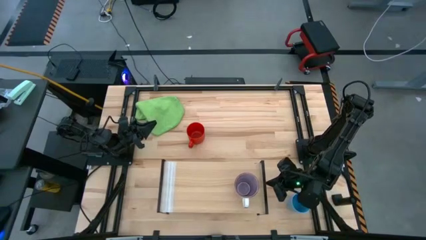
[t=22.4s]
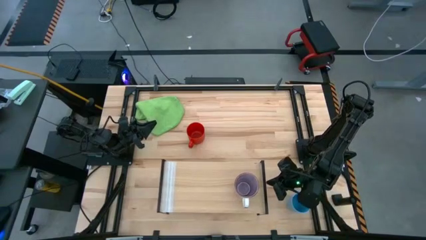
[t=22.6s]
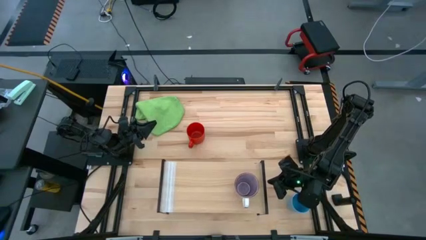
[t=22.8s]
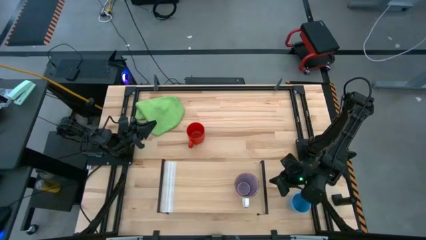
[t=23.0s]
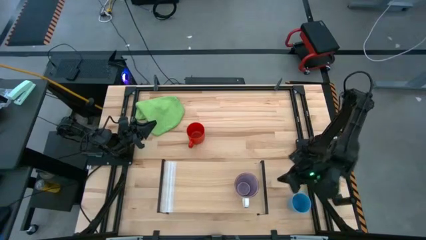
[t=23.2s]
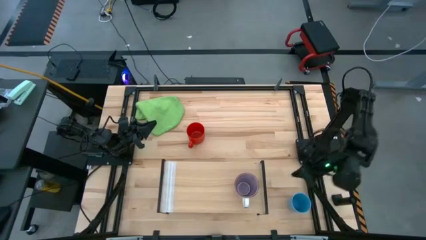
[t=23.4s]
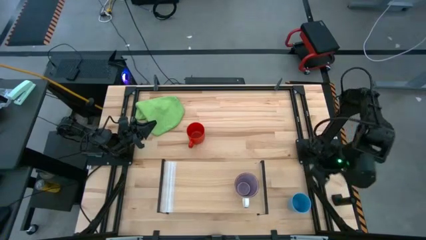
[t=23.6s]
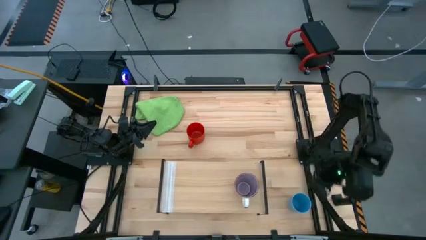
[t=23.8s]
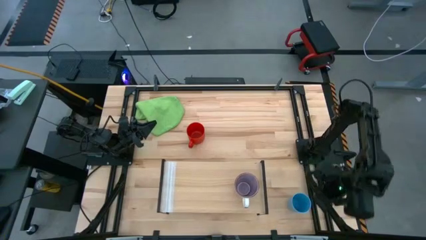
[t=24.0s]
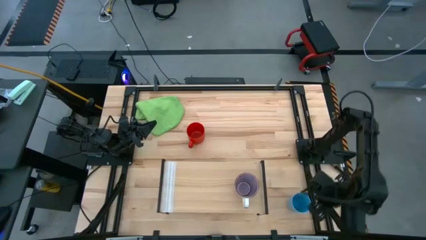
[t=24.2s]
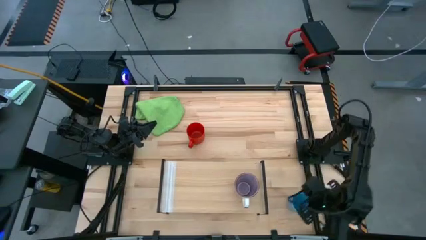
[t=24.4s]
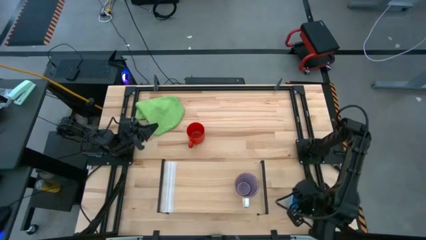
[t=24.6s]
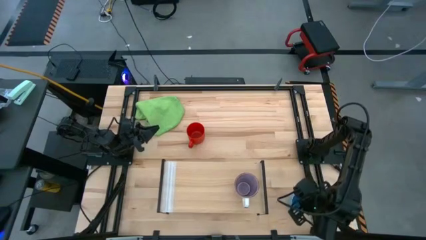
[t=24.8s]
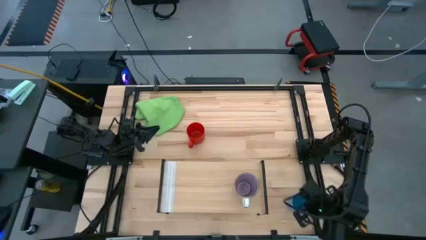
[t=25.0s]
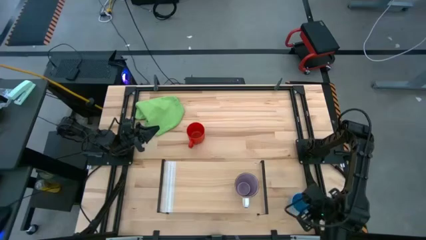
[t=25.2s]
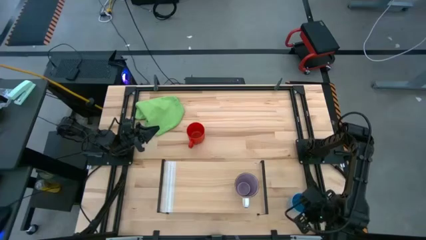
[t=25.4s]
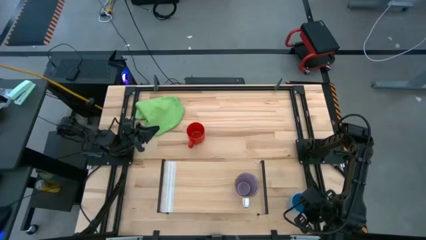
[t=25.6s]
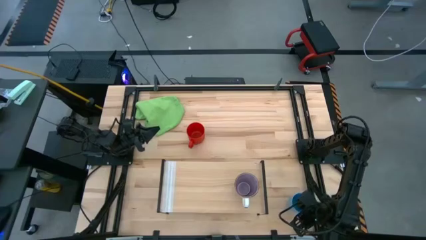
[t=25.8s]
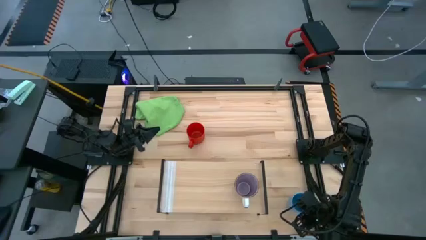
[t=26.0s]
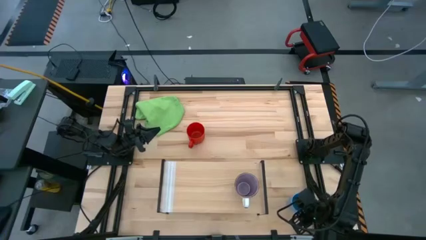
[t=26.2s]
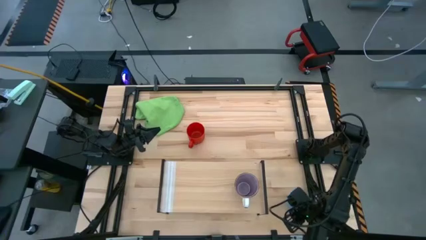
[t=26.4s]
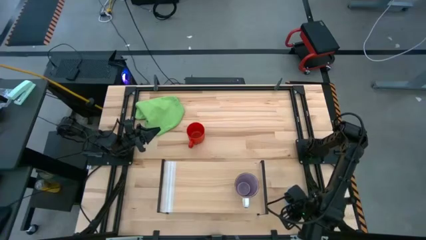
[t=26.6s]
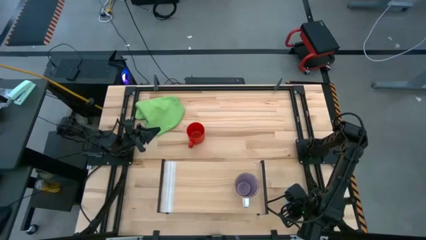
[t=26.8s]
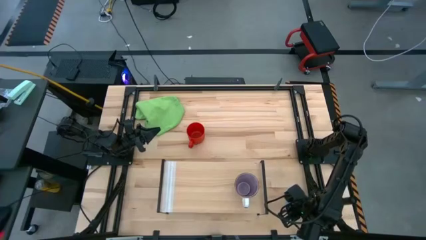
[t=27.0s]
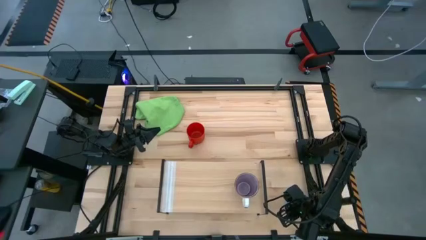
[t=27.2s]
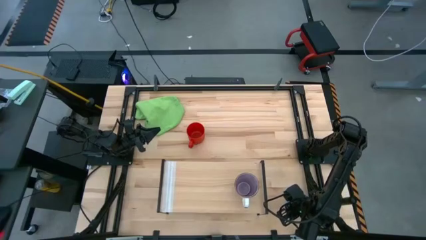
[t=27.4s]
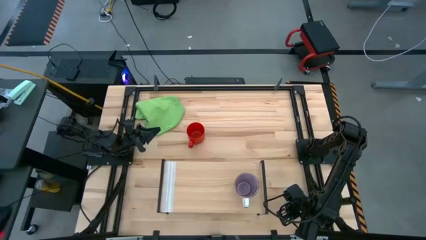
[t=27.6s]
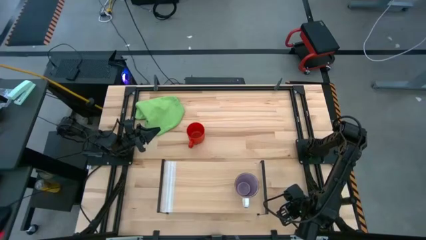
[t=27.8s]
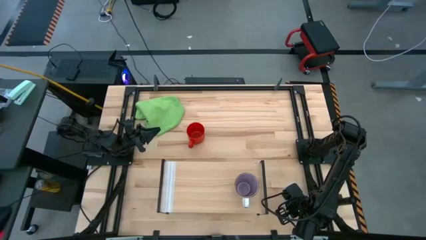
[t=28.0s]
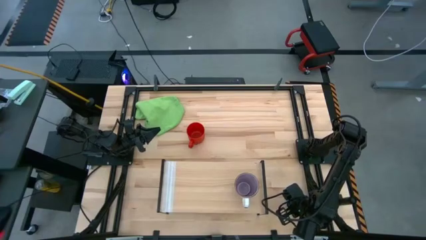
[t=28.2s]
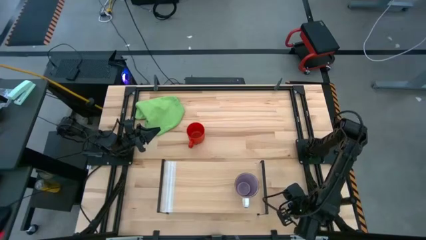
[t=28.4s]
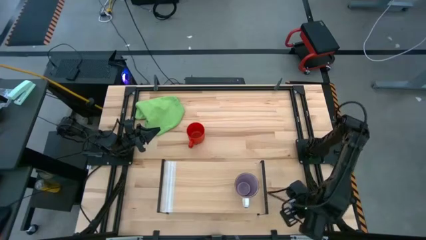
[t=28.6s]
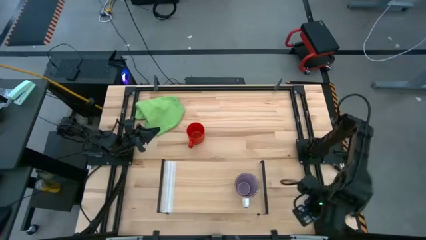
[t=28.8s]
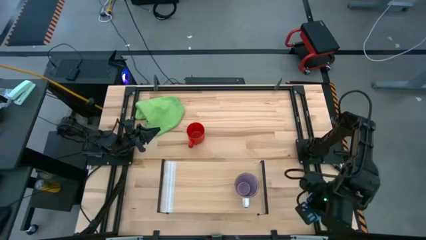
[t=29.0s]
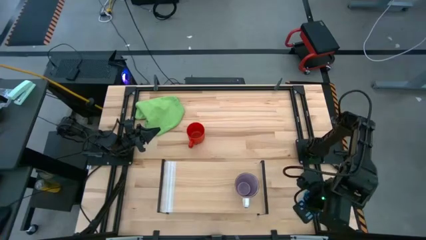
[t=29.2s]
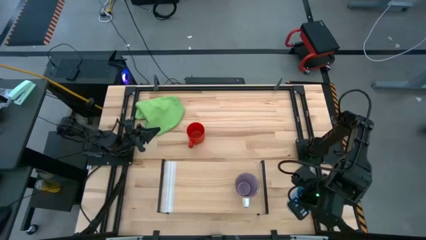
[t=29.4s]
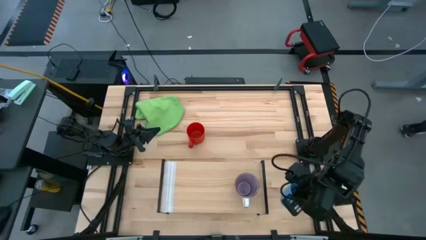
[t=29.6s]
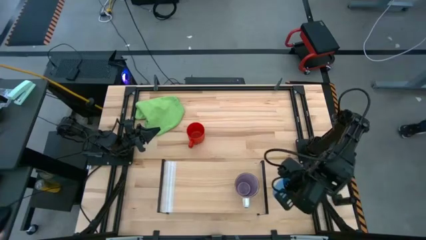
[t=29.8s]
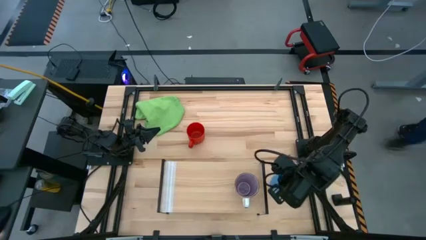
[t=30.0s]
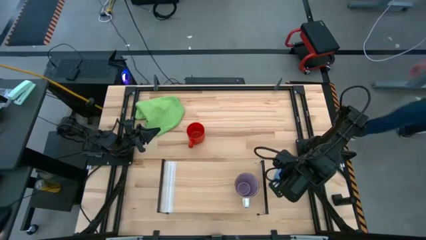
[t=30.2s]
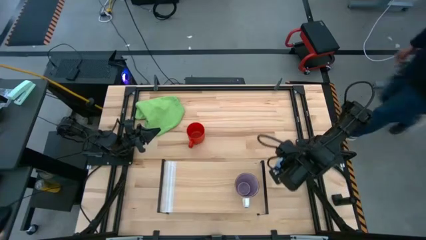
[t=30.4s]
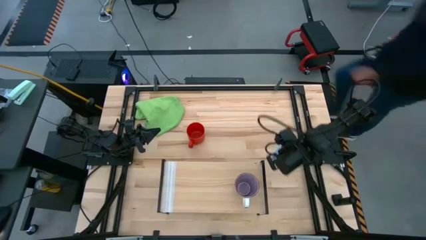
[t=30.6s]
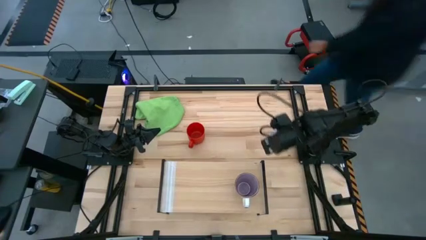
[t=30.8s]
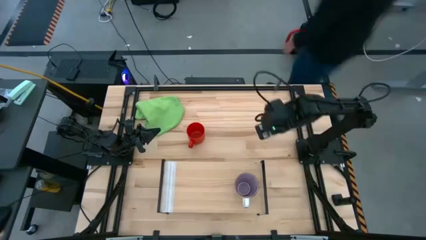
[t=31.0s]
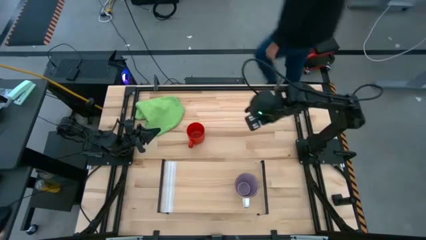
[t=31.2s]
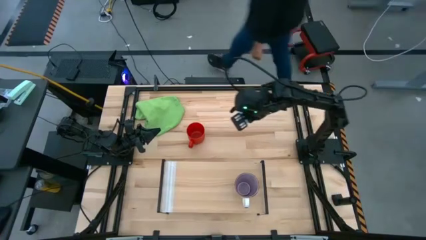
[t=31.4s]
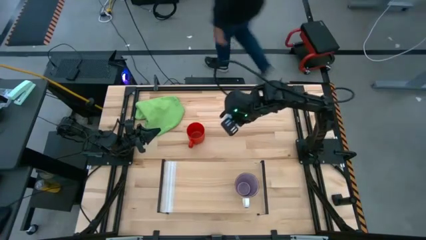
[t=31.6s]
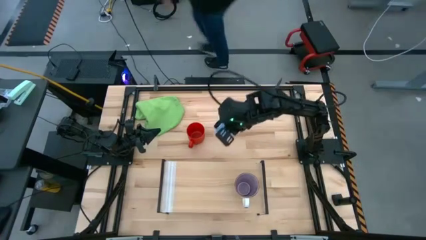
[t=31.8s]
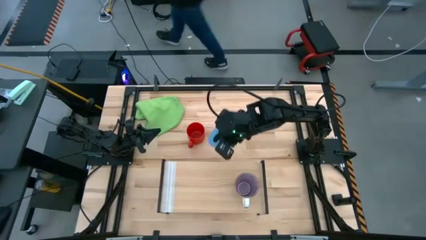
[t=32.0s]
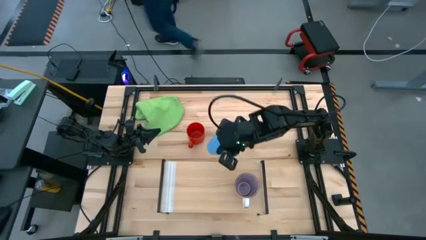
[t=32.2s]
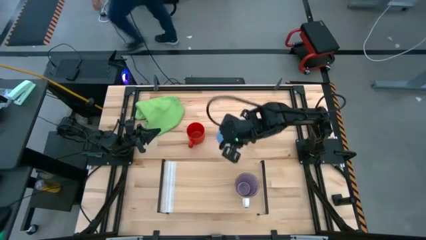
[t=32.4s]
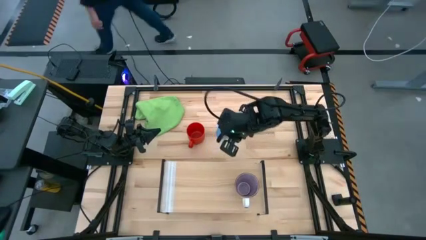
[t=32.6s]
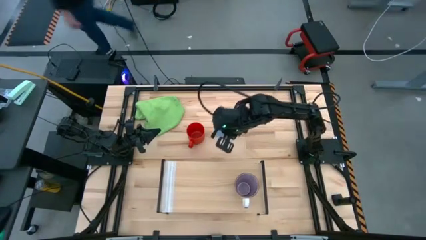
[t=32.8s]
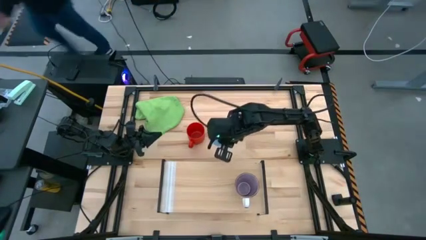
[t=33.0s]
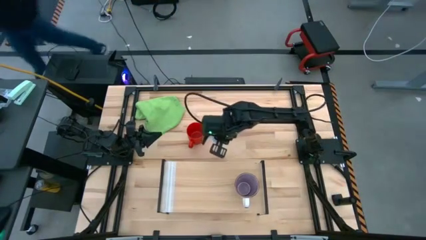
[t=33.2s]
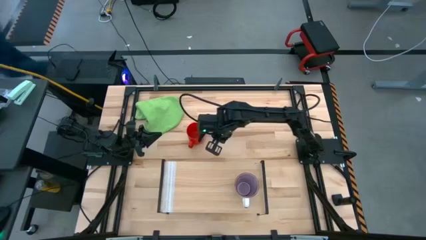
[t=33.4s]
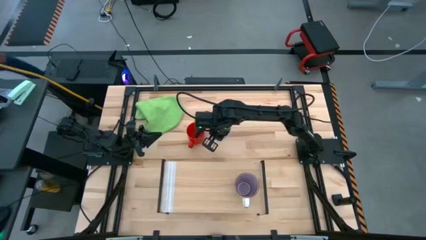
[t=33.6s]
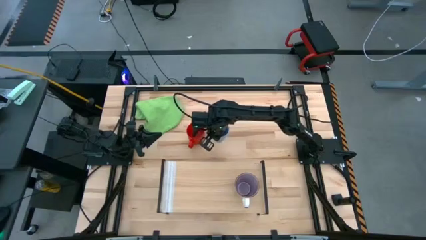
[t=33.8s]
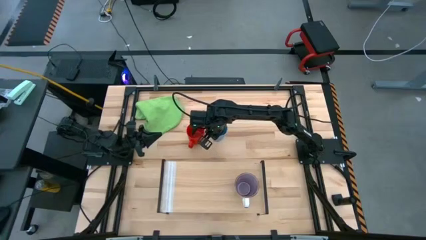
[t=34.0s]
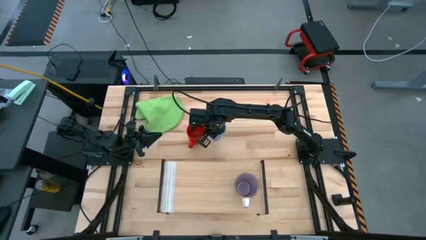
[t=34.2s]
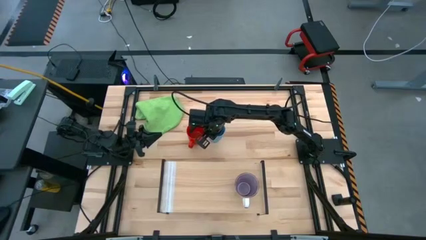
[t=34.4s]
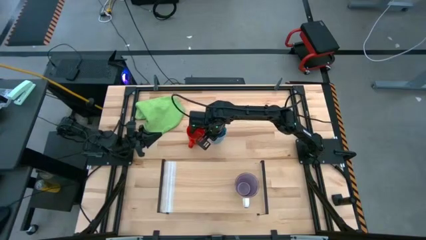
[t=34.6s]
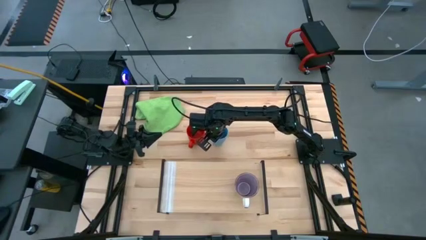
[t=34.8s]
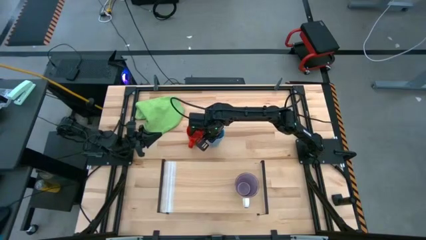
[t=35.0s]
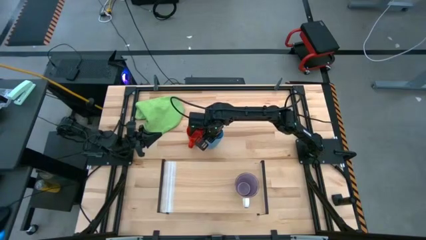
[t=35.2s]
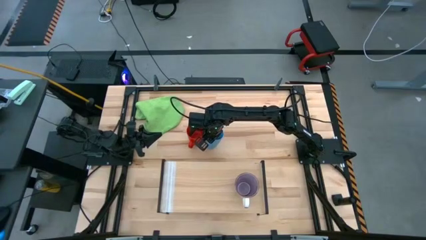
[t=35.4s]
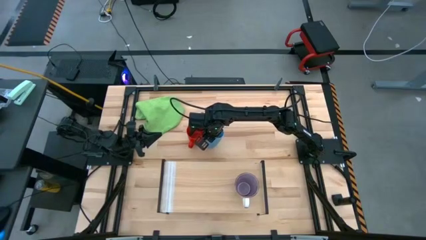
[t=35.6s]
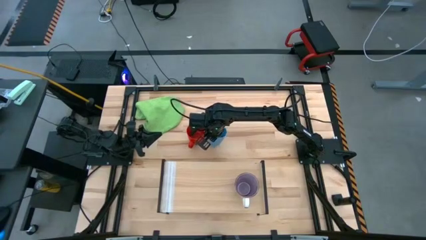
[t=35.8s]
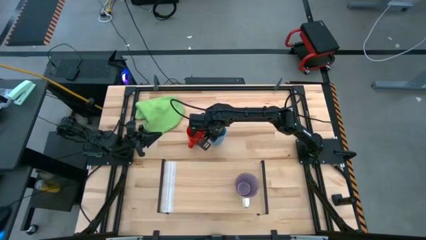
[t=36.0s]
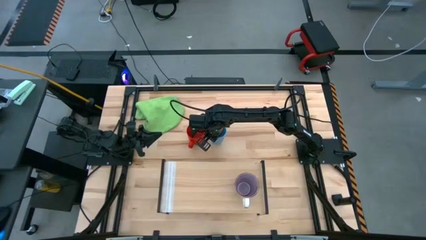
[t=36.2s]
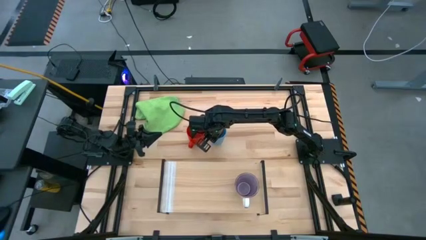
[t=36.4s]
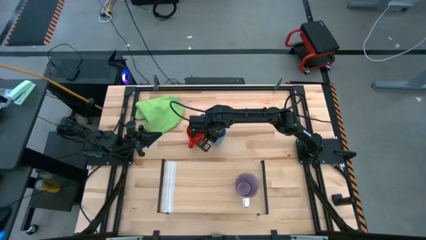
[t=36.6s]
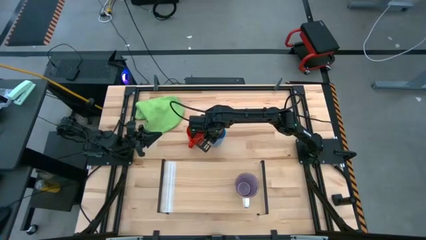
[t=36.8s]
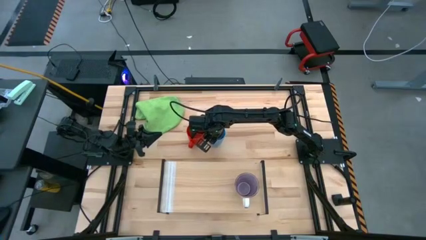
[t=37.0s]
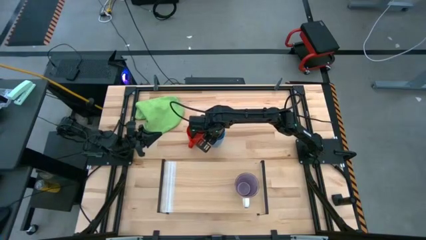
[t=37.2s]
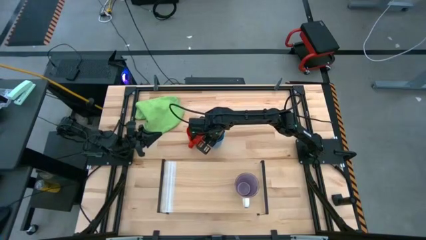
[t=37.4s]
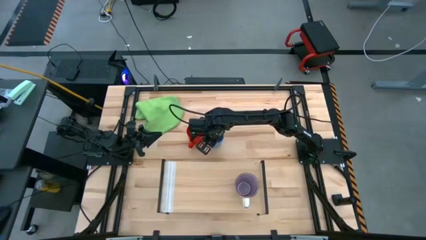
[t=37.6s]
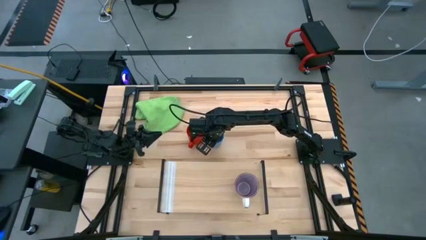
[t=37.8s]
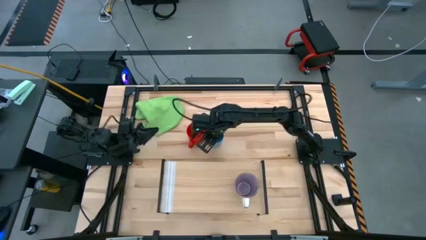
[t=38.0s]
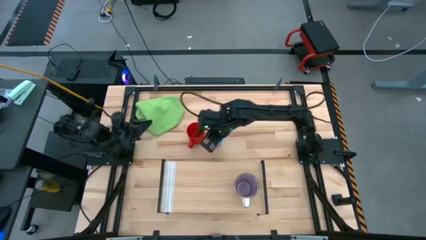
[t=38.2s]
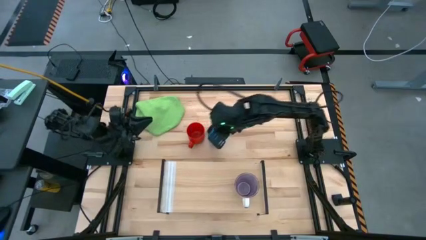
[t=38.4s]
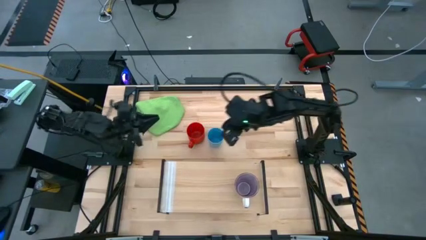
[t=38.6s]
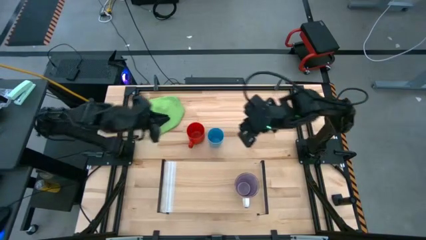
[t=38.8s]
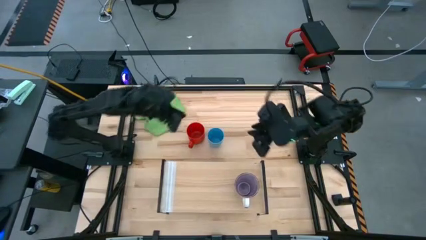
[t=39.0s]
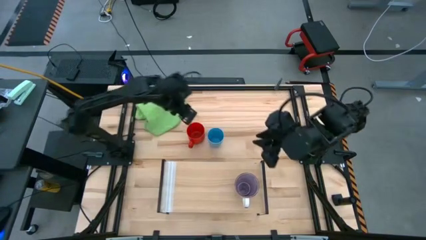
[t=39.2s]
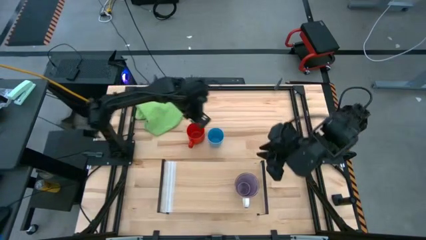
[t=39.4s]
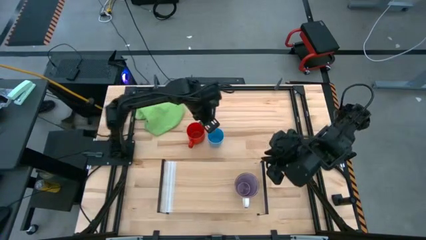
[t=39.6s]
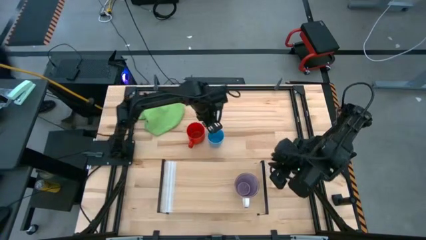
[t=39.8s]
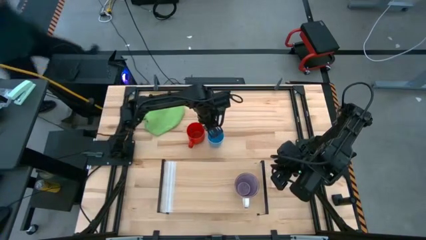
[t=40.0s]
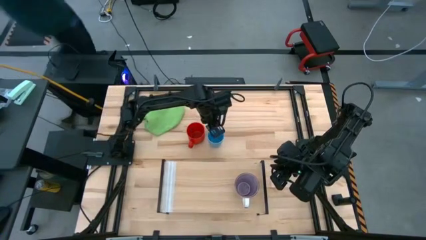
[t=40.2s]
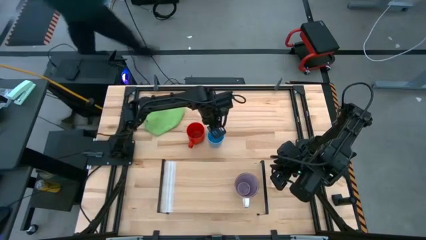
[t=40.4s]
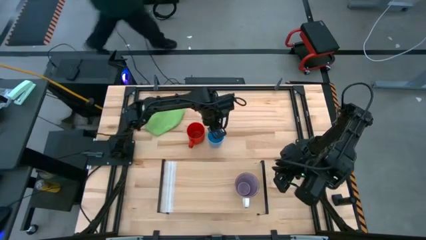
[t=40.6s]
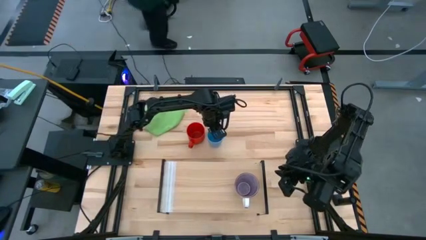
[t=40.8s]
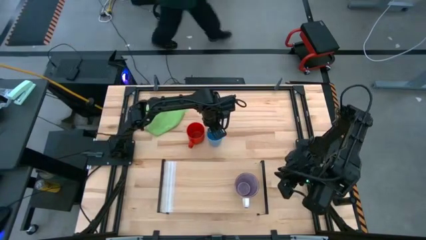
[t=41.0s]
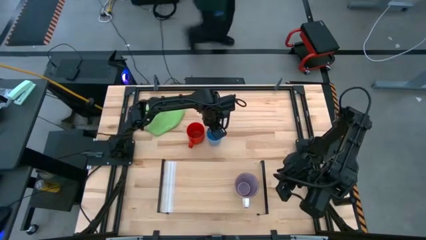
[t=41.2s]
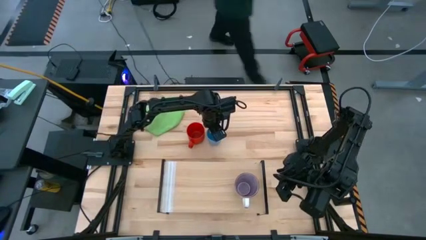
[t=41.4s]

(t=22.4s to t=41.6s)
Task: Stack small to large cups/mugs on shelf
Put the blue cup on the shelf
